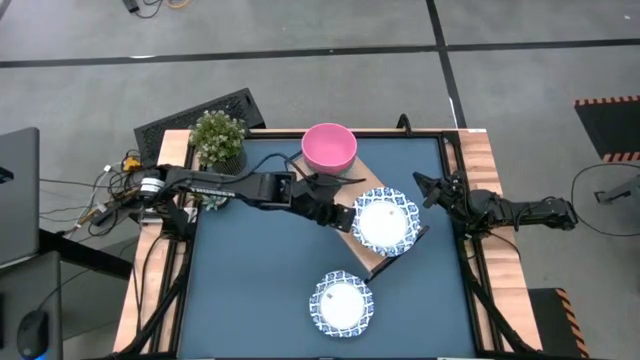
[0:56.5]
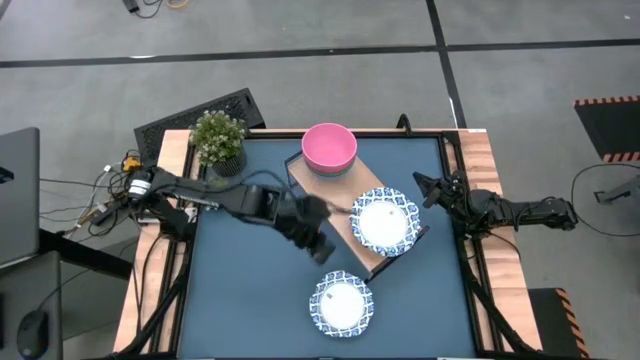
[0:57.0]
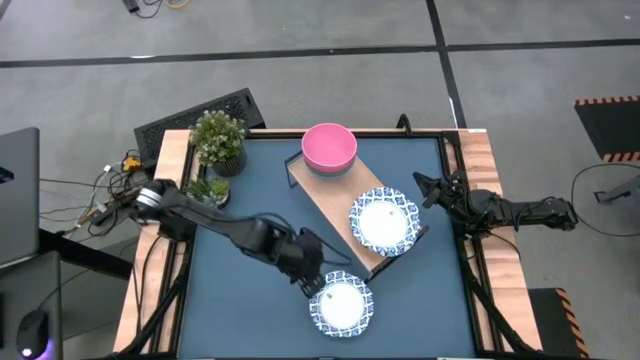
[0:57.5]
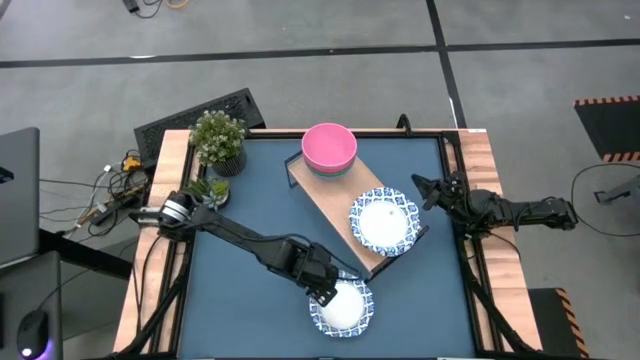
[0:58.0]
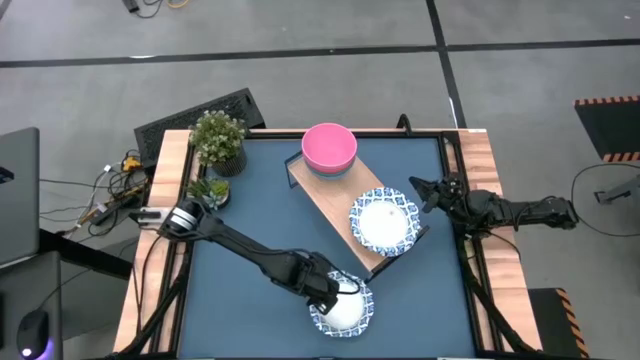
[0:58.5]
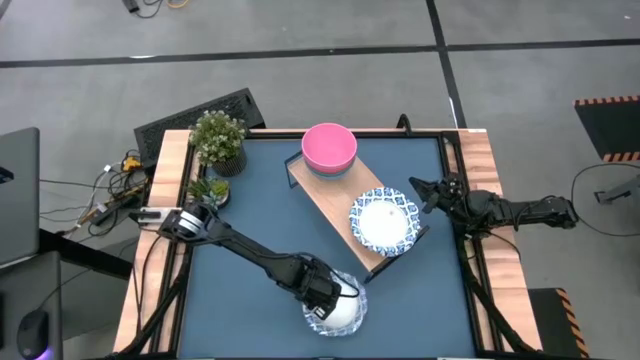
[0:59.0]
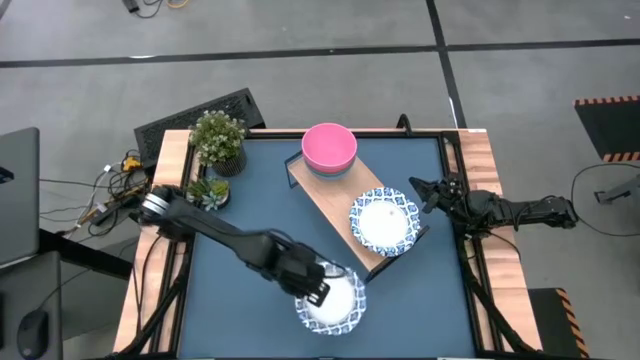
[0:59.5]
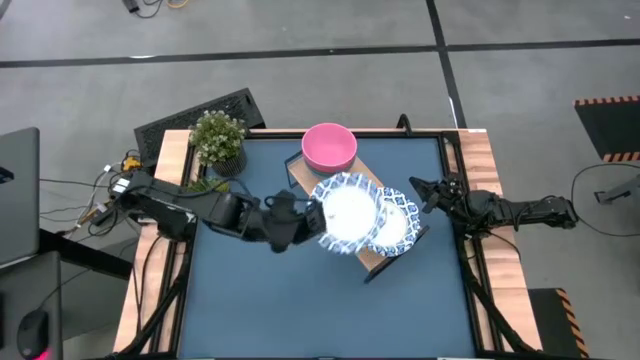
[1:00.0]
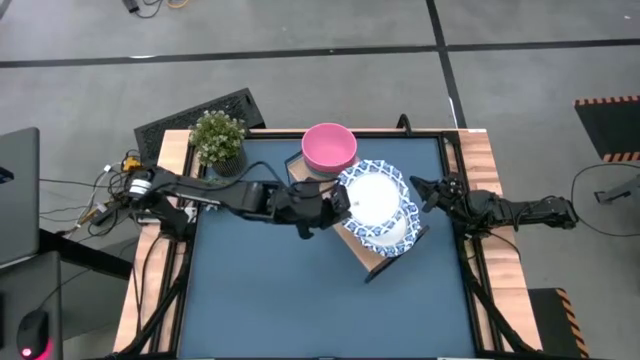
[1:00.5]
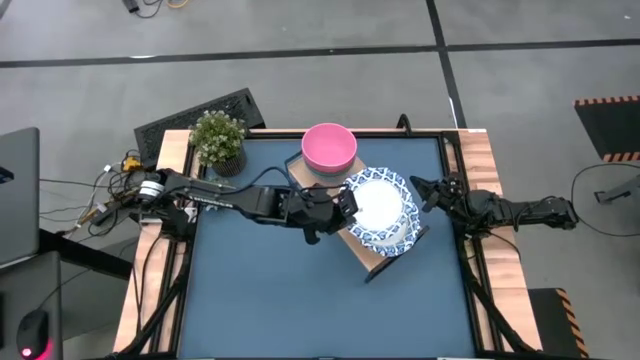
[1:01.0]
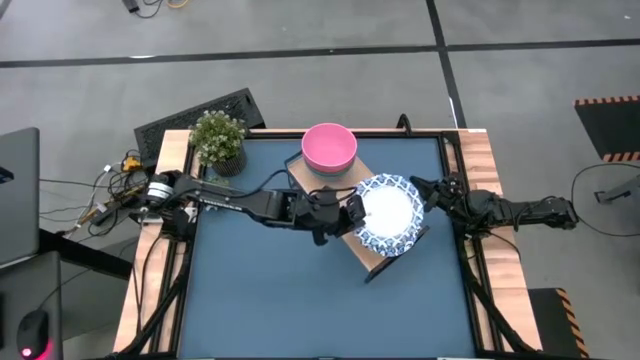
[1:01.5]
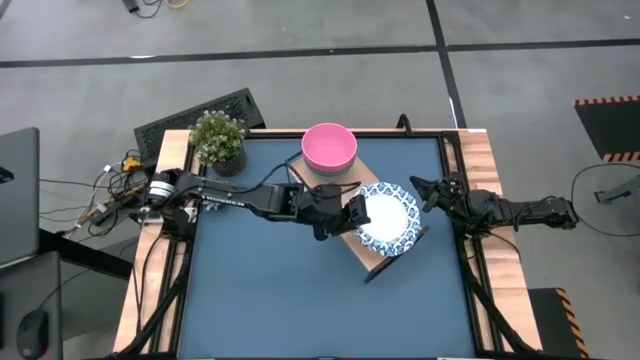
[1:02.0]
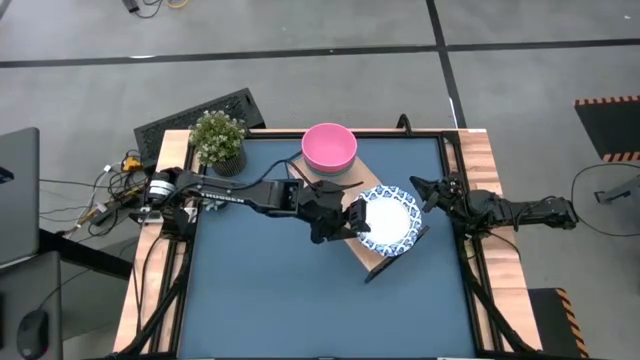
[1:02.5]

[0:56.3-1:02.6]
Task: Place and stack plates onto a shelf
Stack the white and blue plate on the shelf

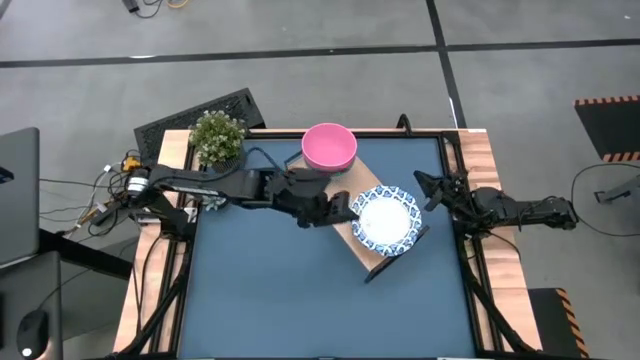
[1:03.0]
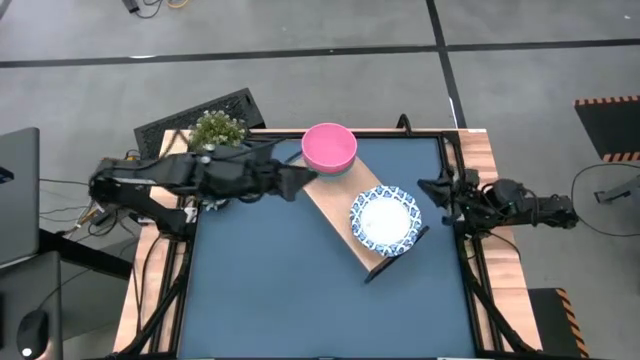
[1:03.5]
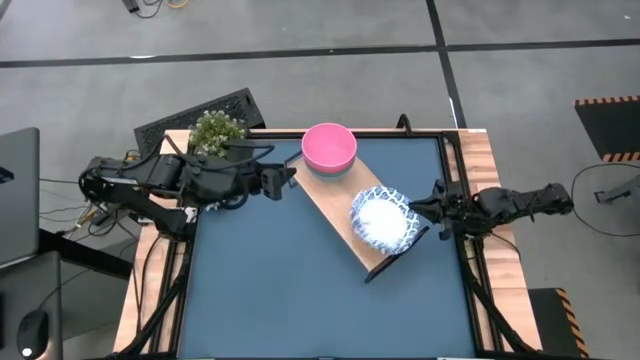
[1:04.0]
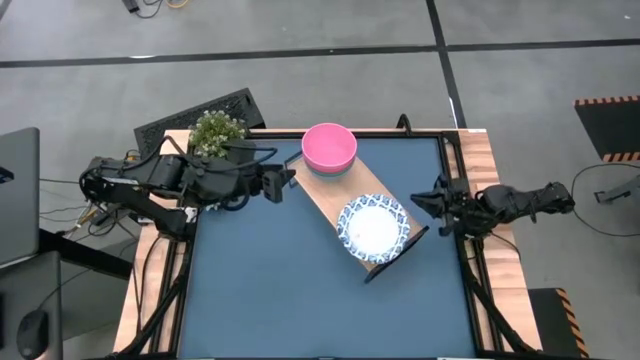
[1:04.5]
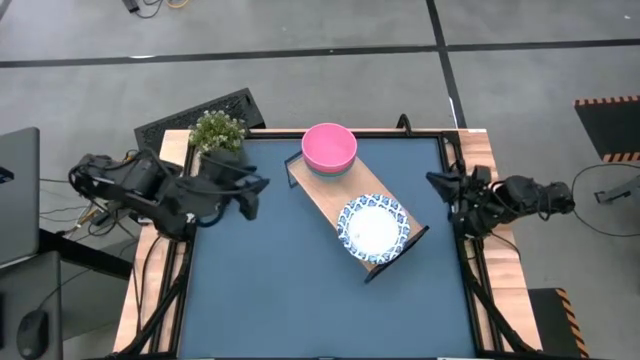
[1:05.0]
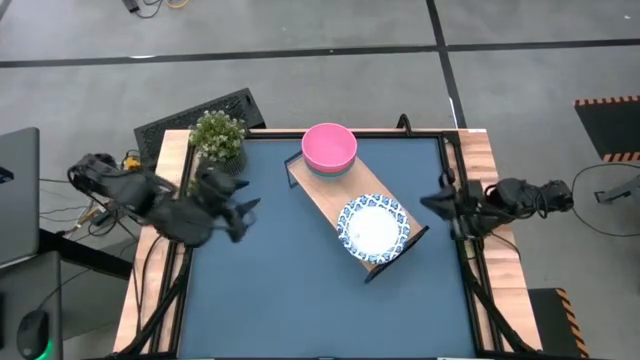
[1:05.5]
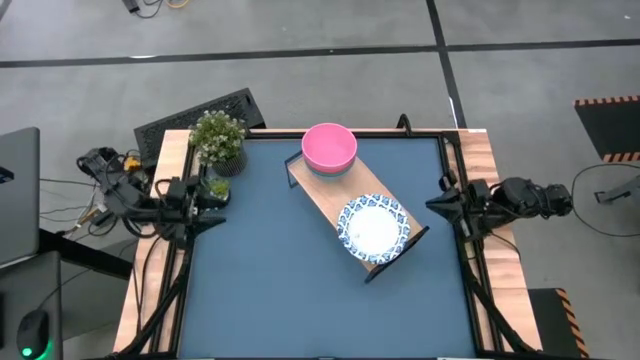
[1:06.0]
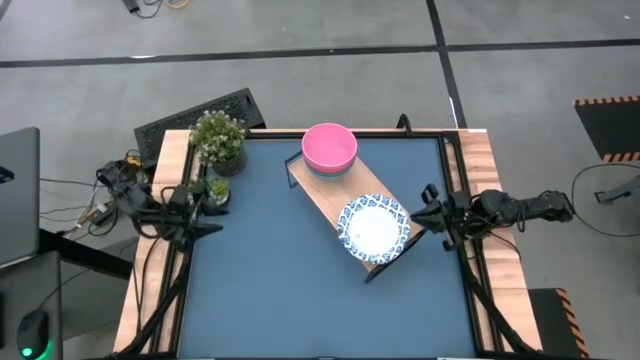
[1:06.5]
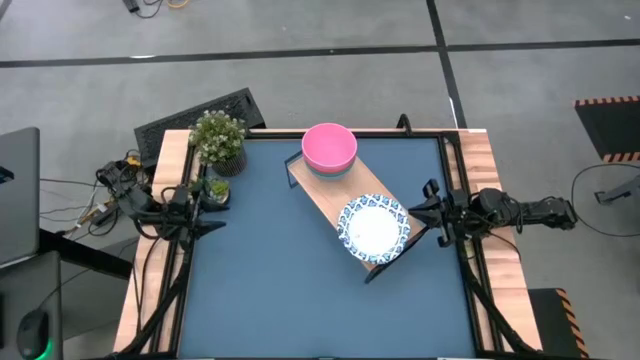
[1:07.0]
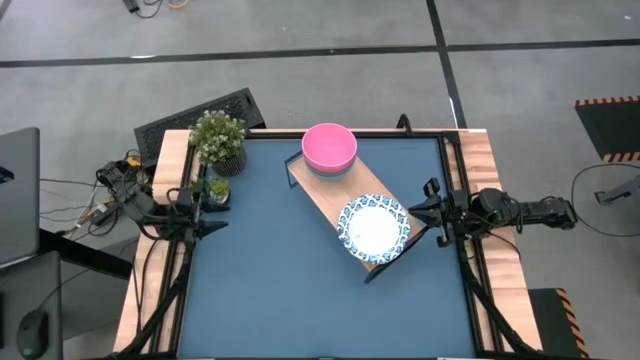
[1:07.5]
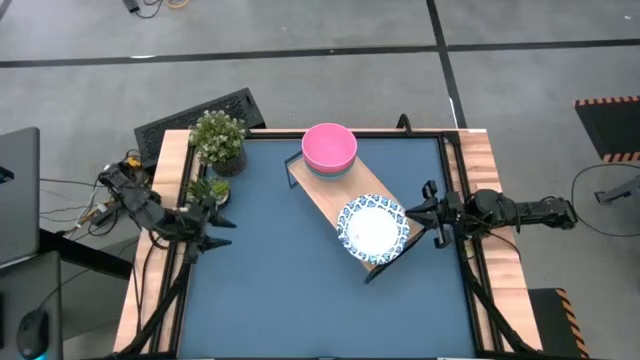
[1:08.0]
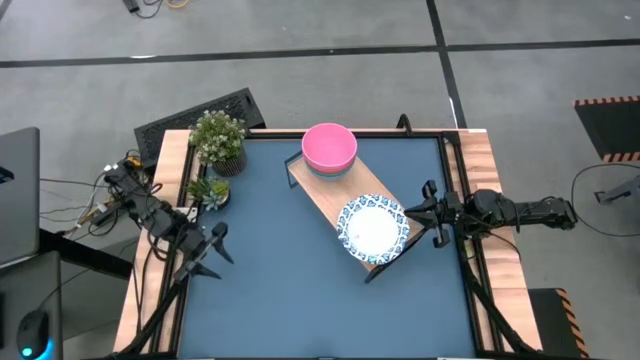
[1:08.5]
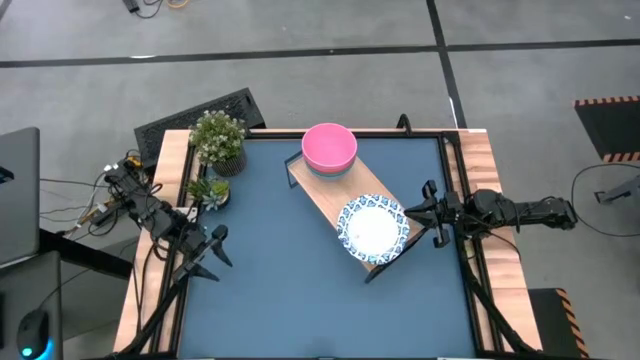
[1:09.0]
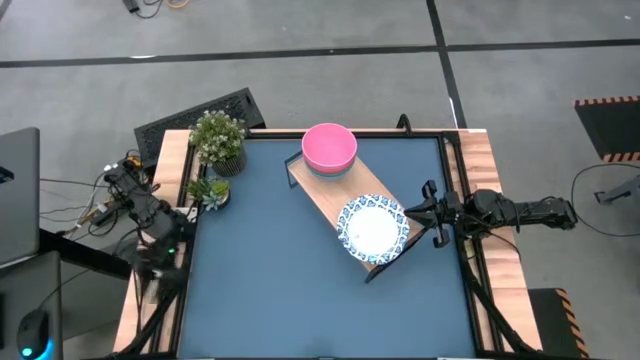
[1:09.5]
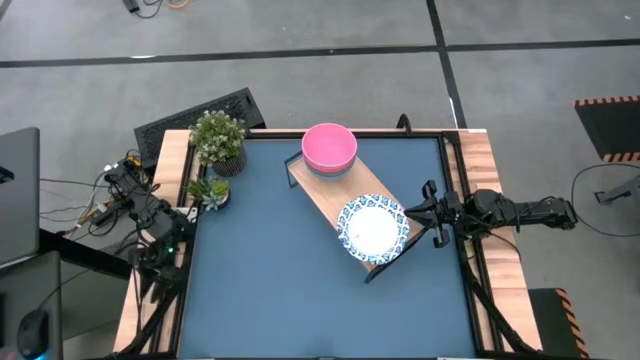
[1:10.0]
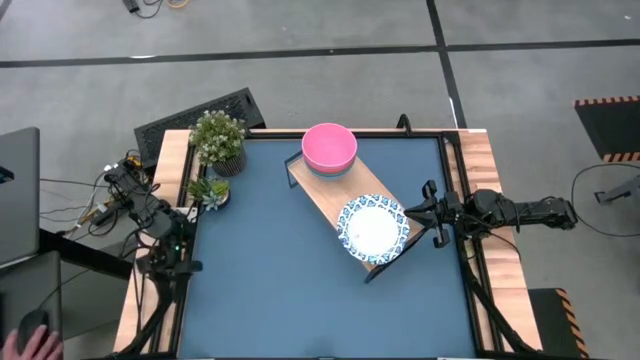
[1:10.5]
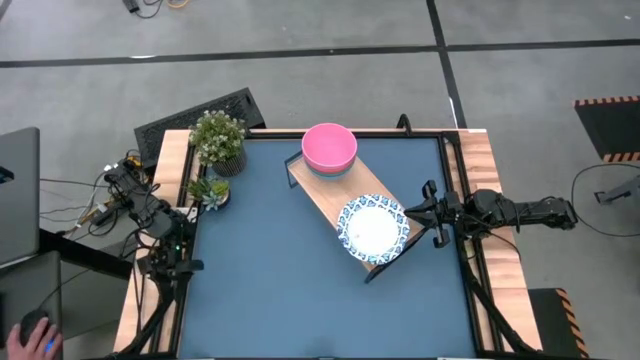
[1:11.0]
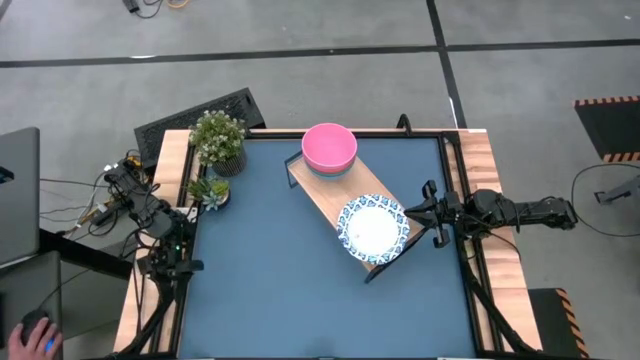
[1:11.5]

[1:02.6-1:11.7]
Return to Home Position

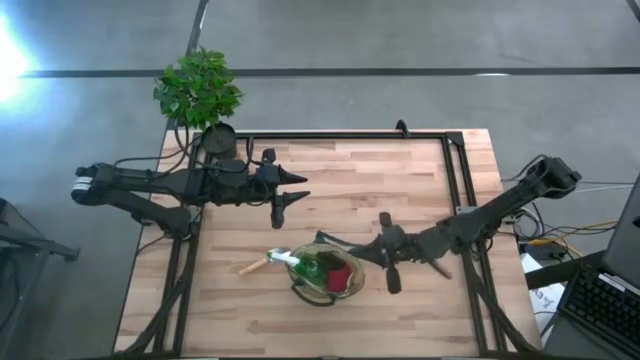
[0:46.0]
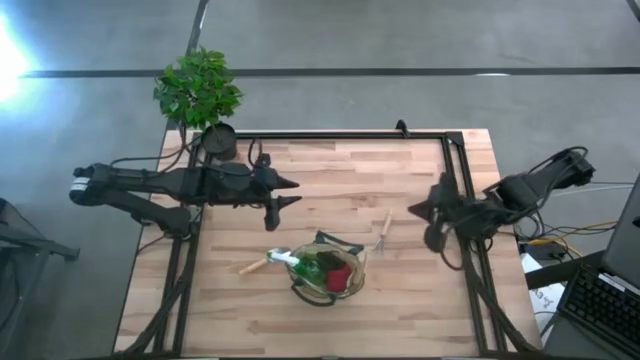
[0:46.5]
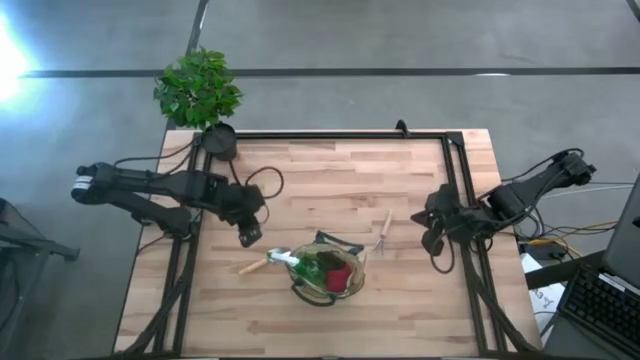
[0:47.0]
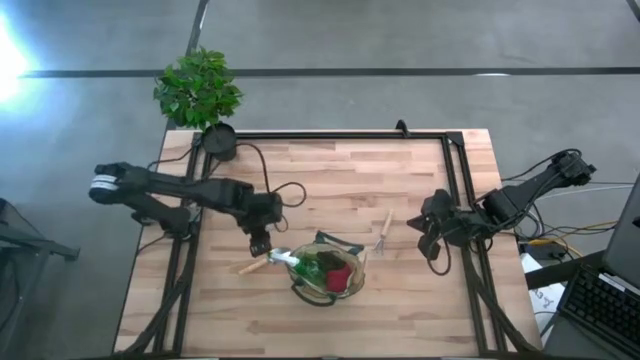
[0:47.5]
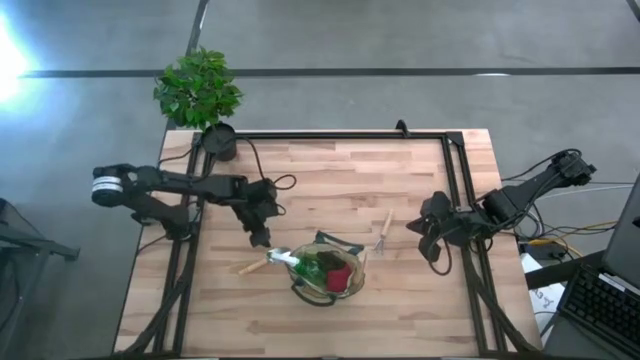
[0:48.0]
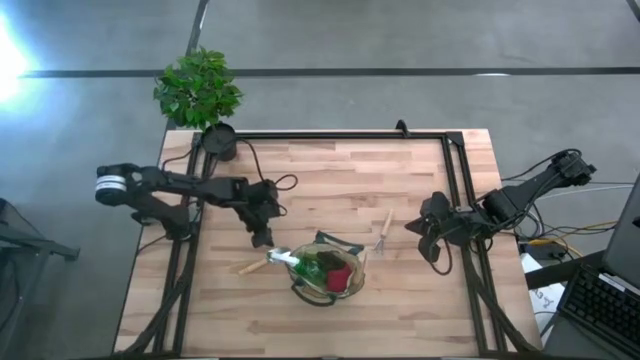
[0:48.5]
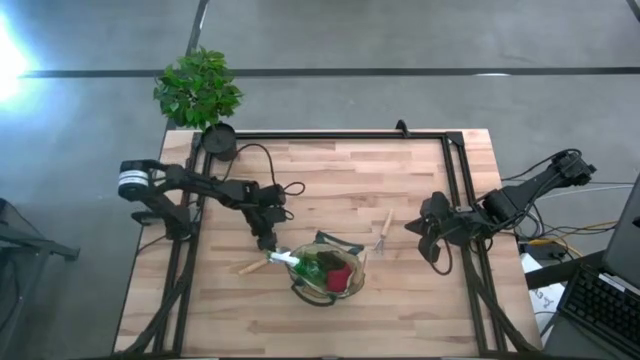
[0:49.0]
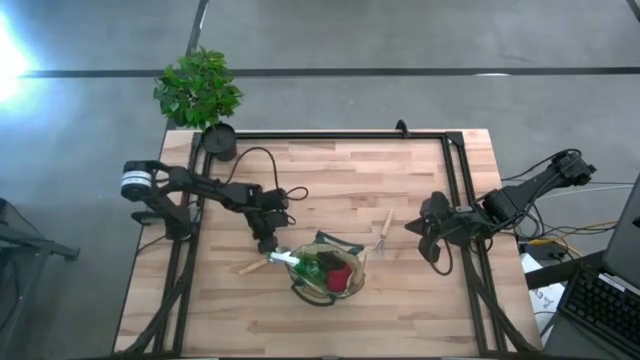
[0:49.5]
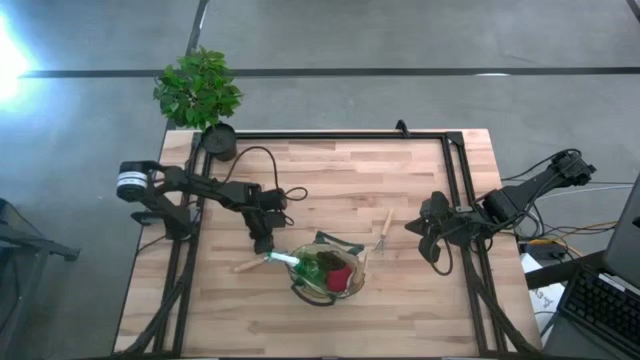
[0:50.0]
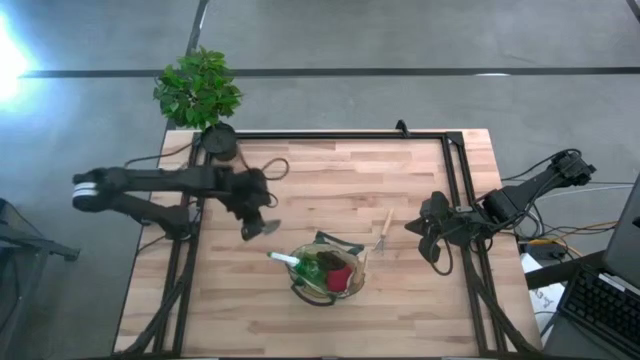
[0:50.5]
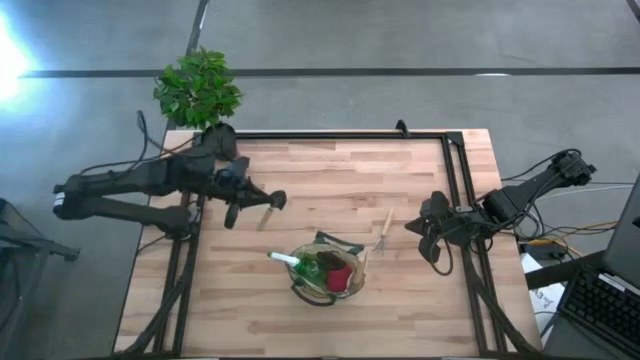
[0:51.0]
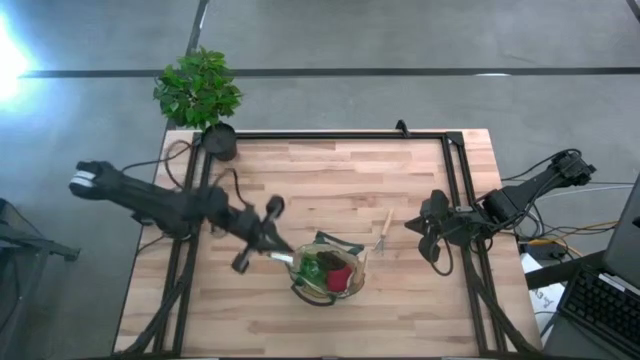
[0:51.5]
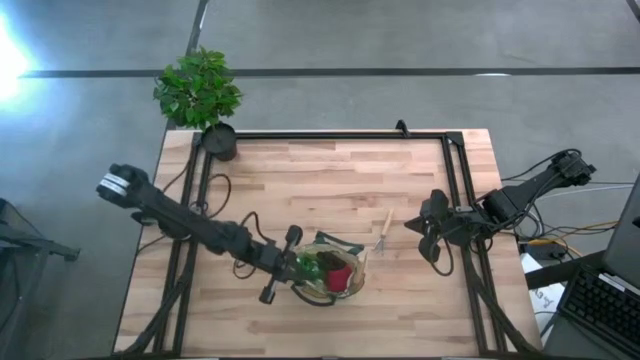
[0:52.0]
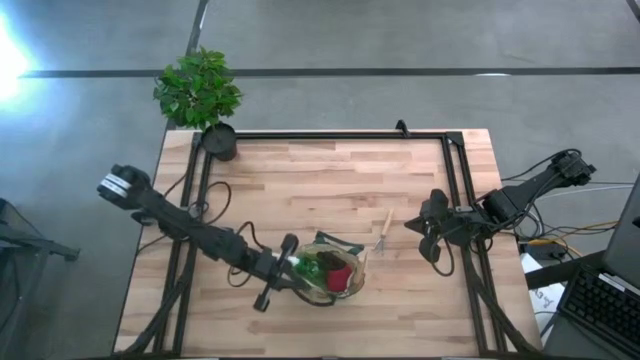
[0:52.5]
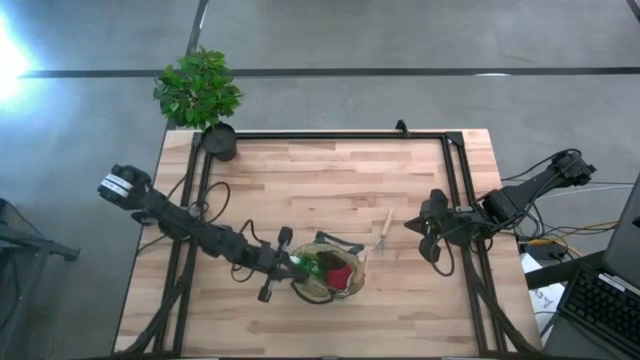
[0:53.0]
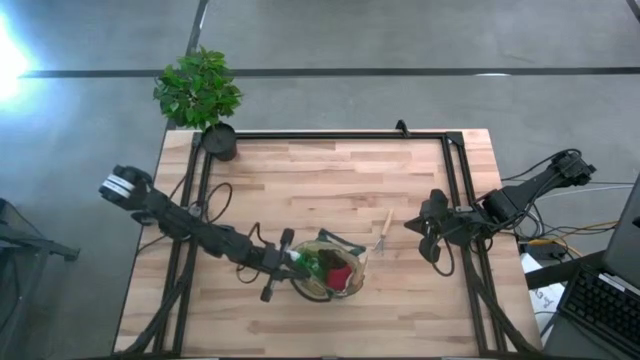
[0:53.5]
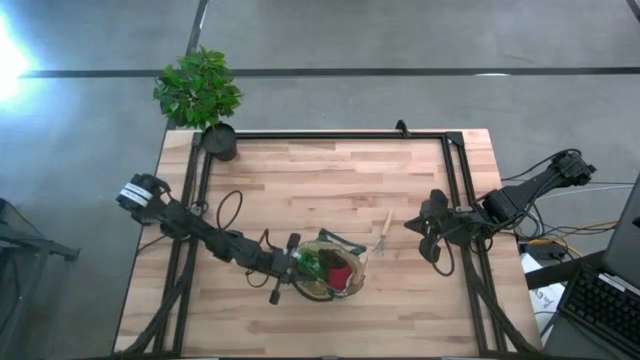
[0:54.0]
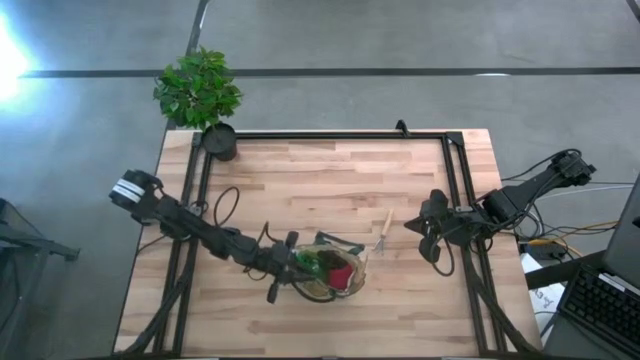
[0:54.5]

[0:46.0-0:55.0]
Task: Pick & Place Garden tools in Gardening bag
Put the trowel into the gardening bag
